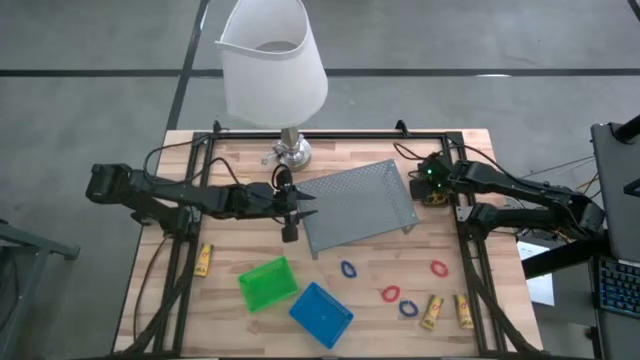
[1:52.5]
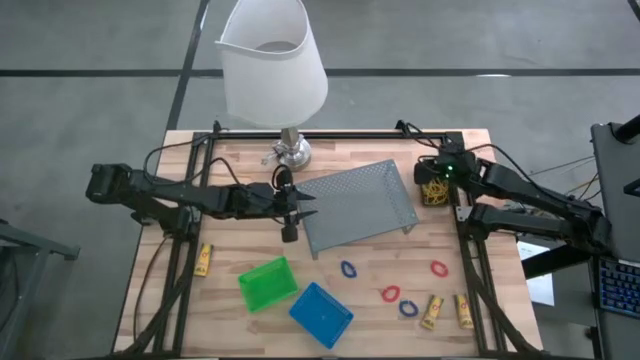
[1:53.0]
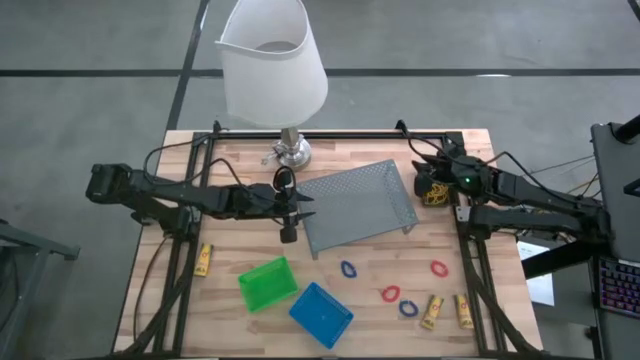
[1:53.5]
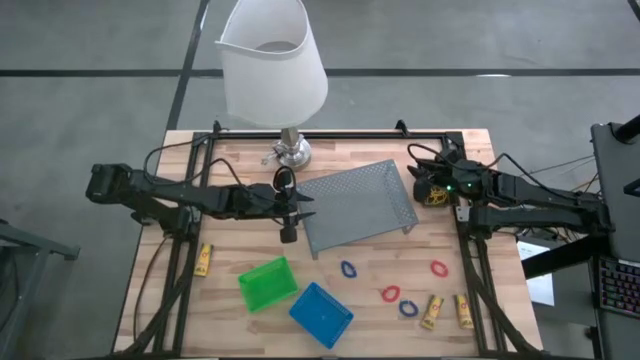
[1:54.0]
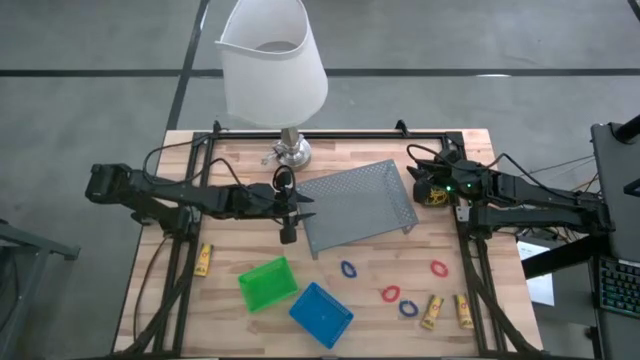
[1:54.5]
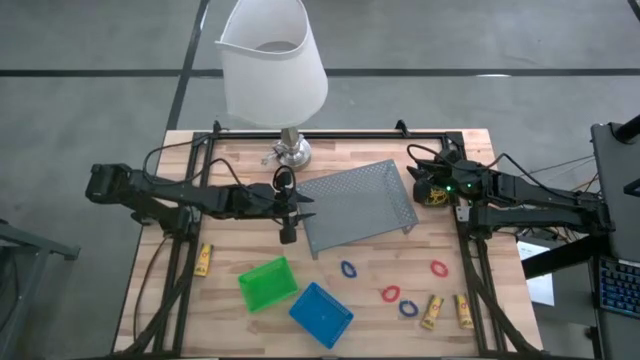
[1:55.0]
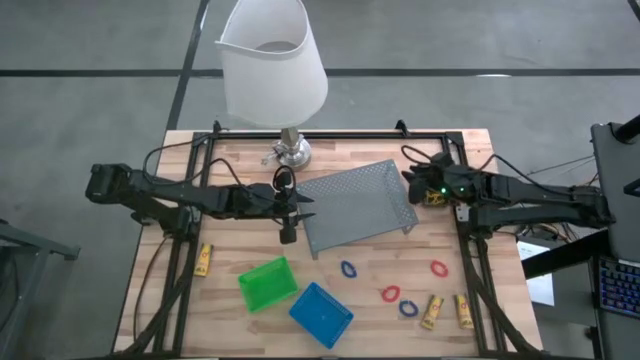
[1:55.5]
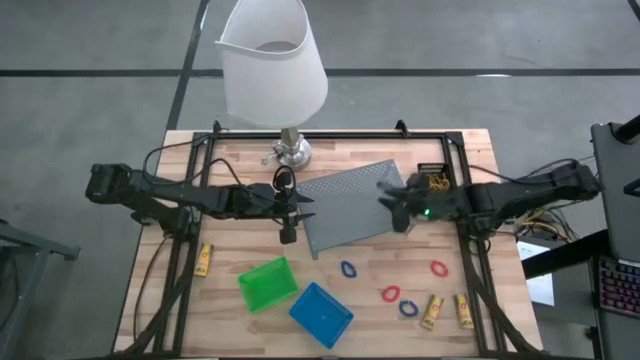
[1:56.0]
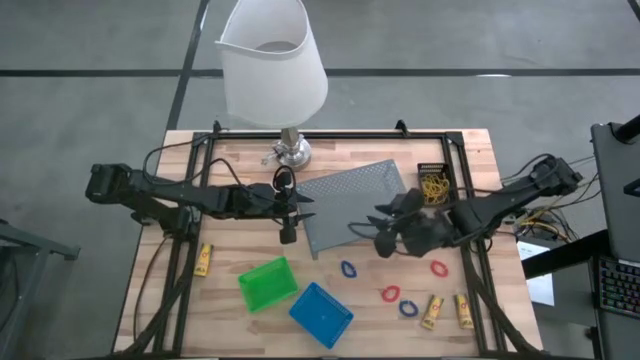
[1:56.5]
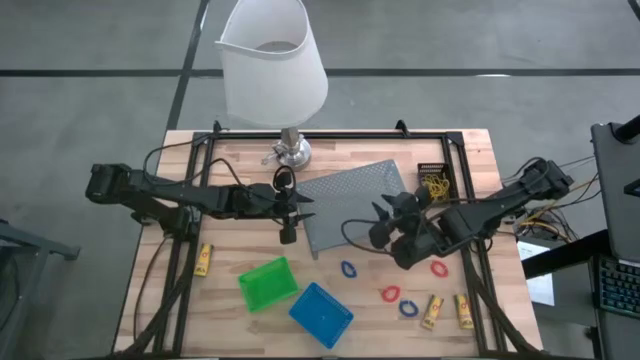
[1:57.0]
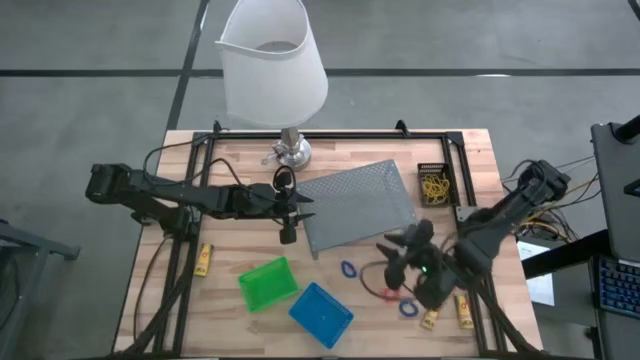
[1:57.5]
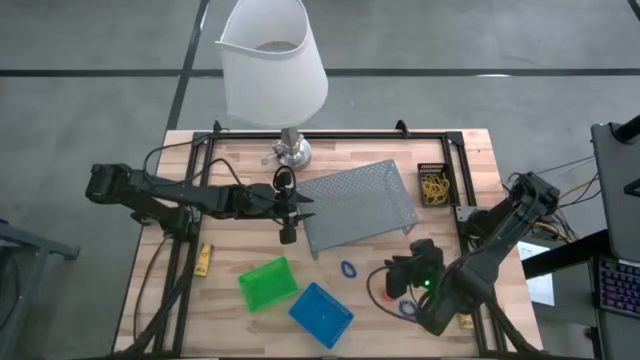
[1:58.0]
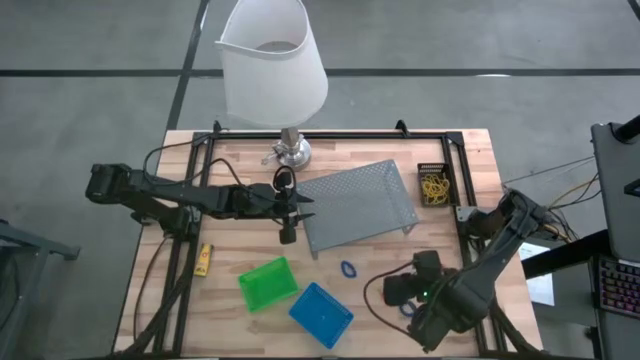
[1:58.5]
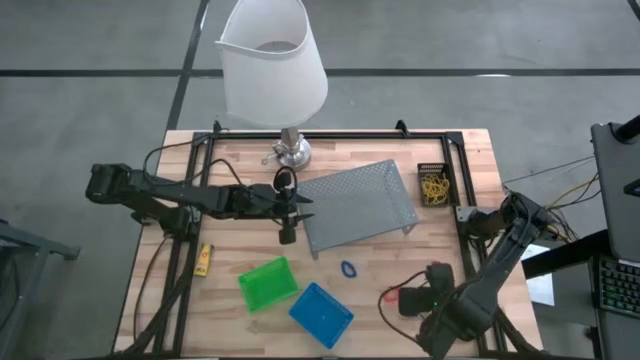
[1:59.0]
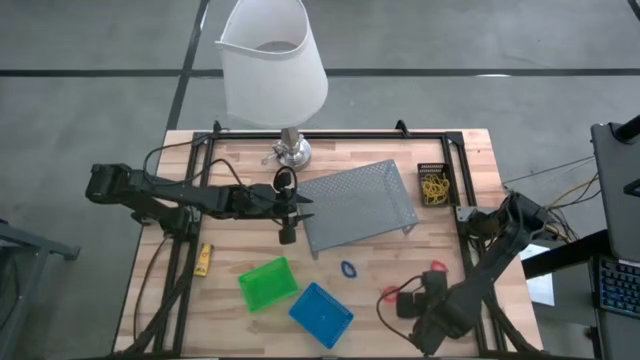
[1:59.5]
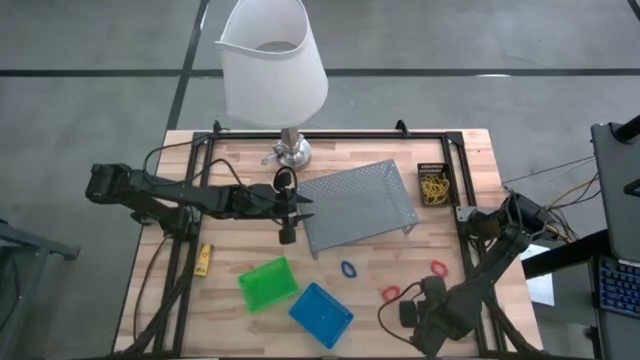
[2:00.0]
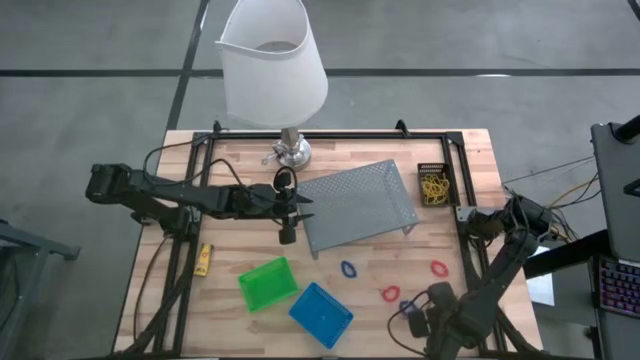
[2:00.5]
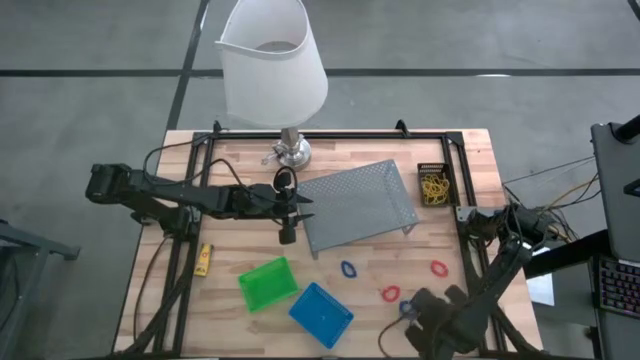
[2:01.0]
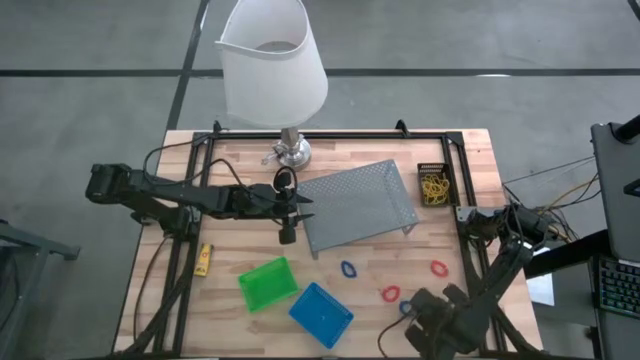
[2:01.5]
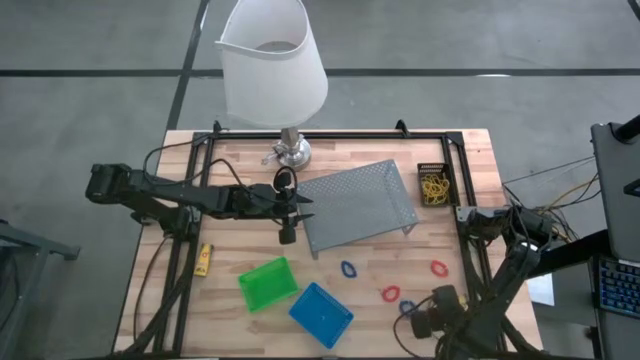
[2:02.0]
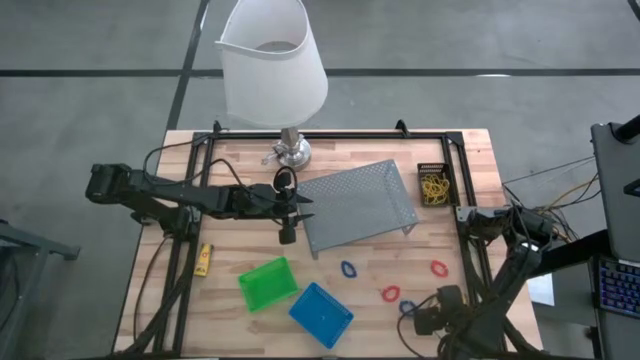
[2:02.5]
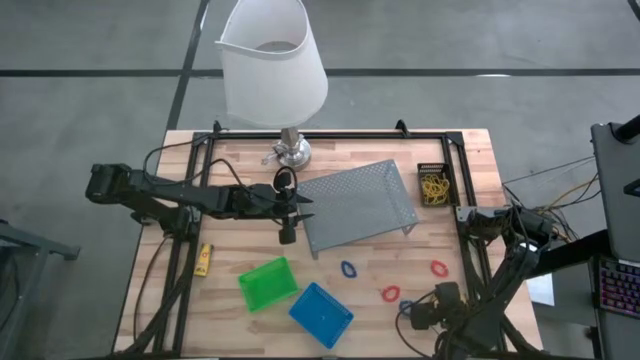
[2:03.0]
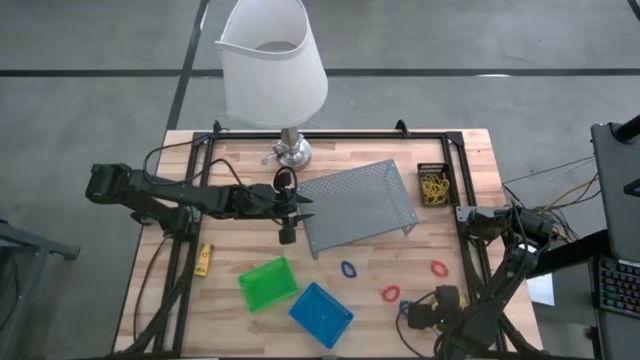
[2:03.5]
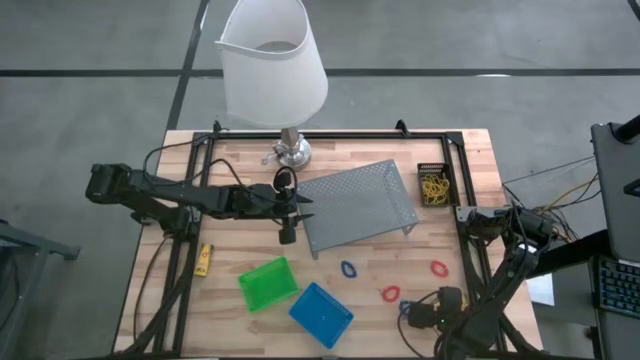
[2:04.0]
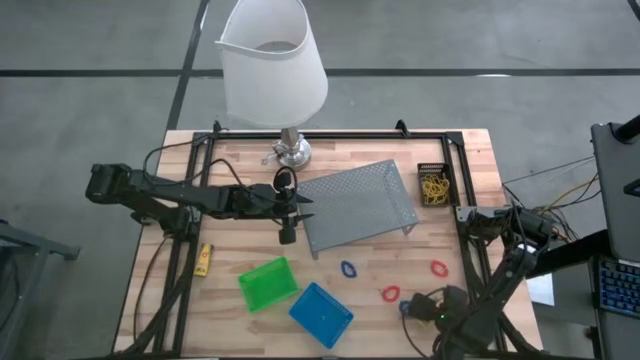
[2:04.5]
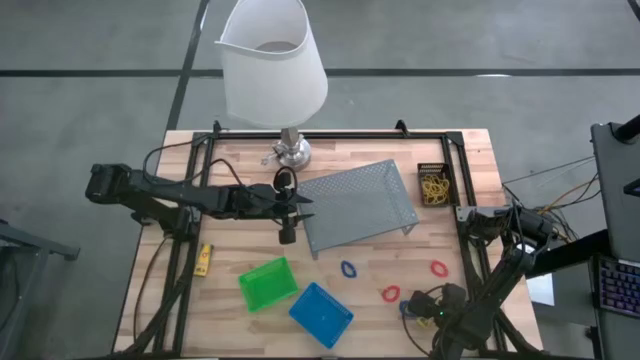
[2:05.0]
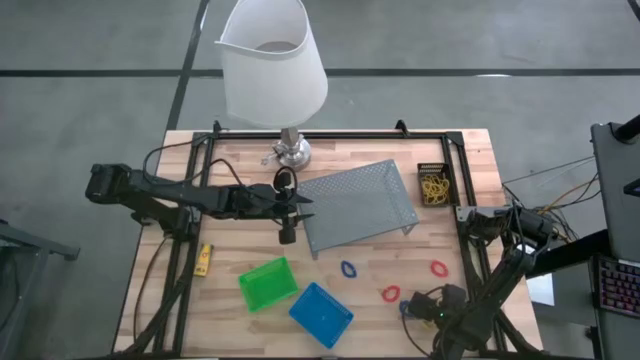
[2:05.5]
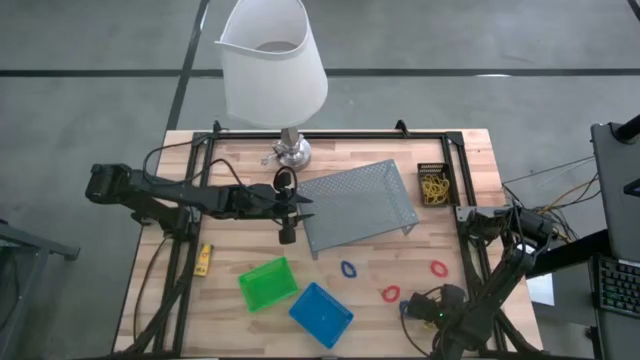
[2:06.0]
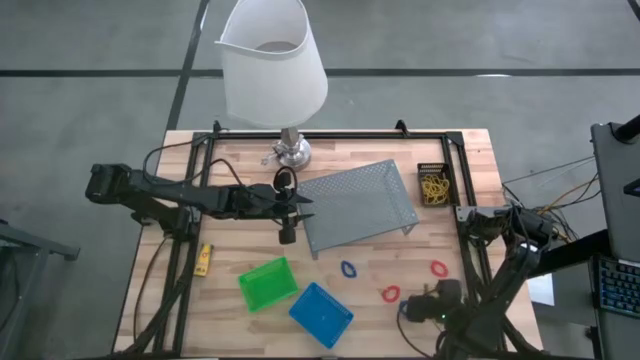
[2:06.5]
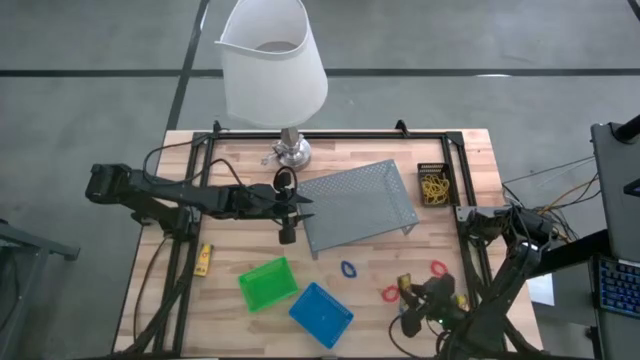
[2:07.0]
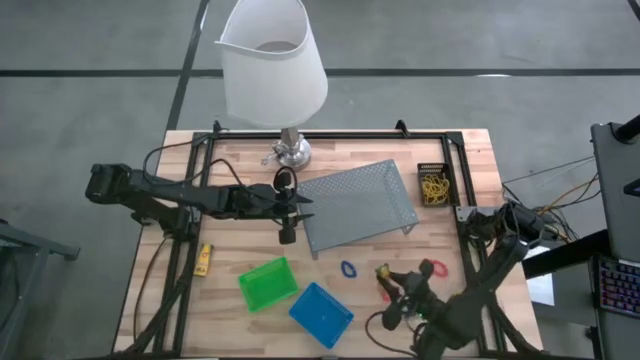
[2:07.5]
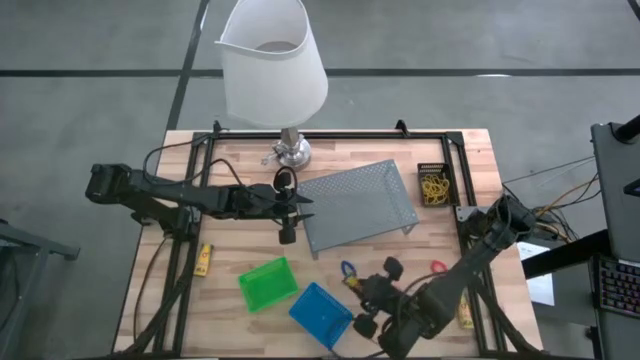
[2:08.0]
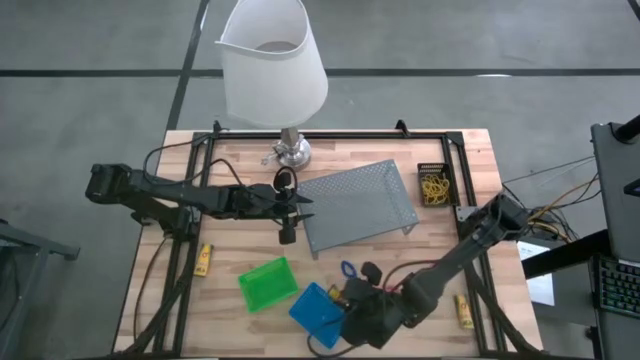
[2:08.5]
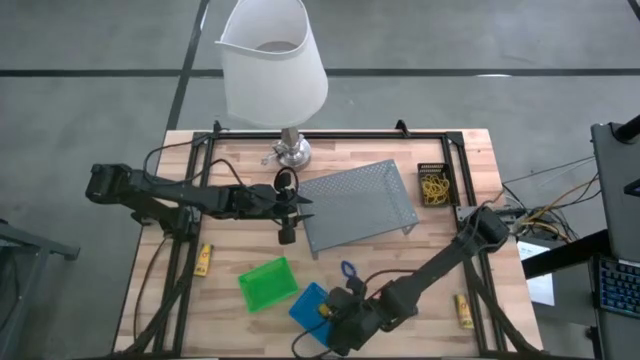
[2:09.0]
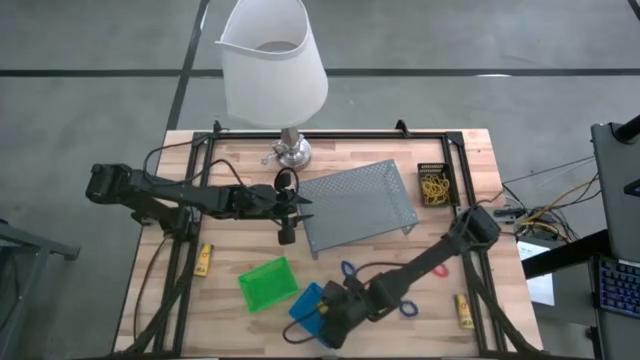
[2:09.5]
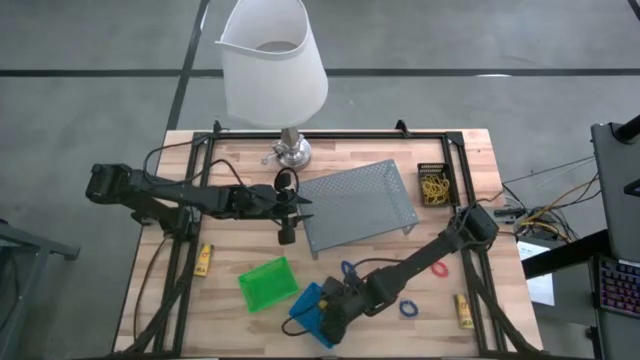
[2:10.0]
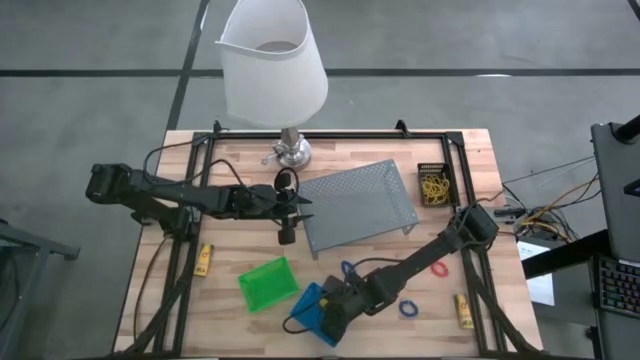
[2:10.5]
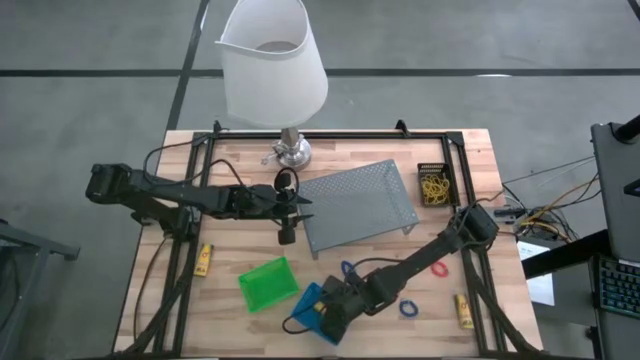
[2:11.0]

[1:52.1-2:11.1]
Task: Pick & Place Office Desk Supplies
Put the crayon box into the blue basket

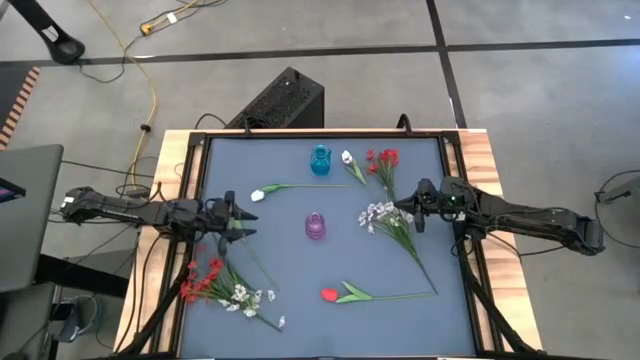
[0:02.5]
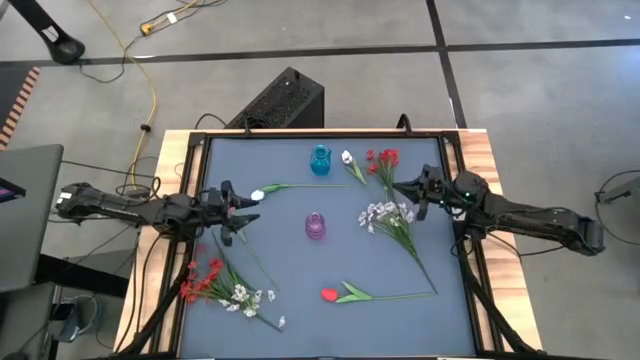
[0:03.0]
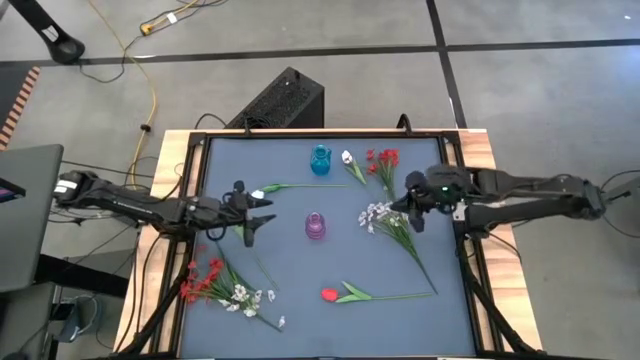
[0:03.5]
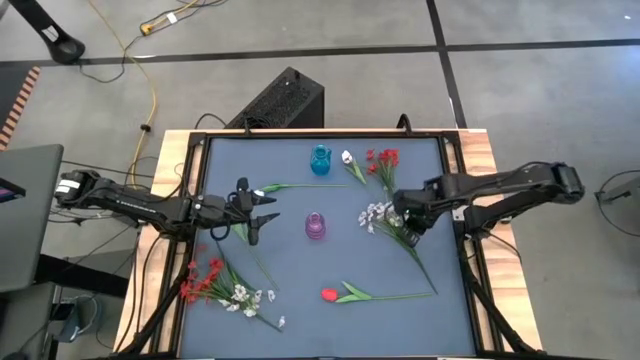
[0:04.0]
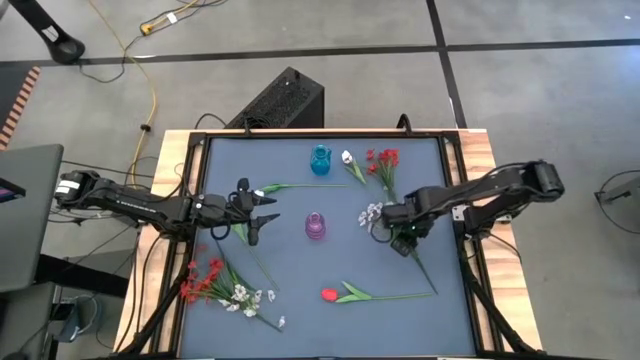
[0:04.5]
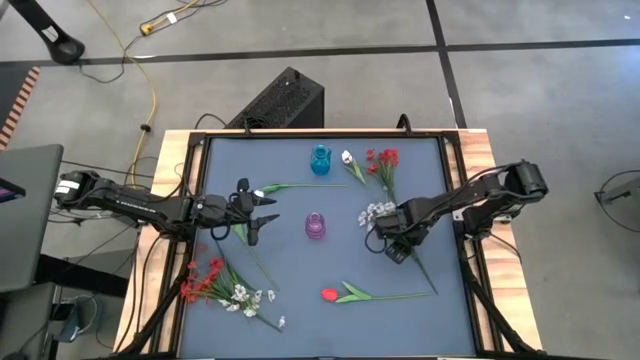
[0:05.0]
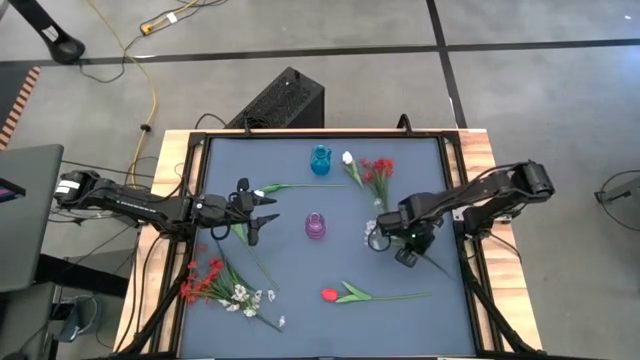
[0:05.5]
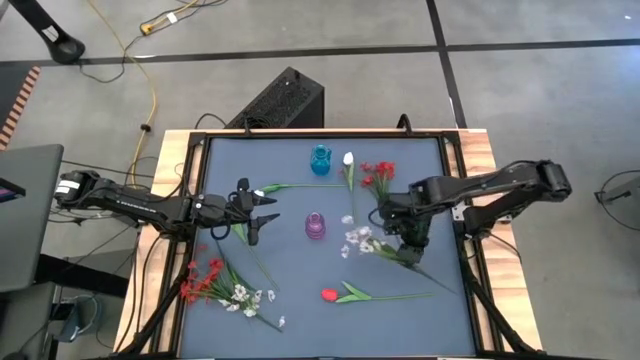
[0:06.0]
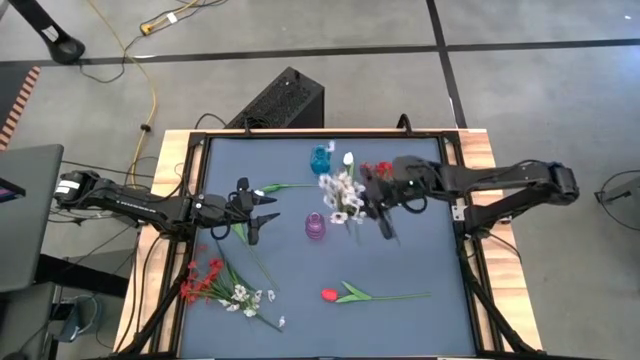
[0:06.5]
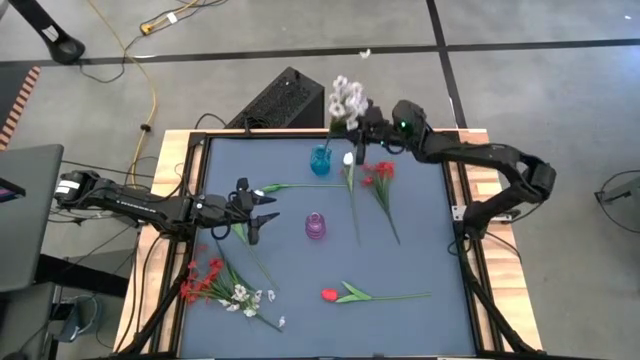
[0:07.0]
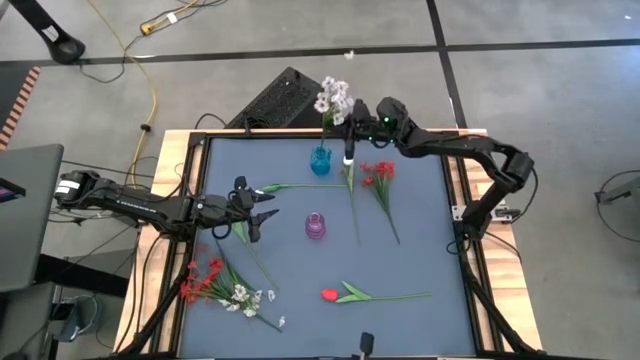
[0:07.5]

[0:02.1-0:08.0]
Task: Sort flowers into vase by color
Put the top white flower into the blue vase
